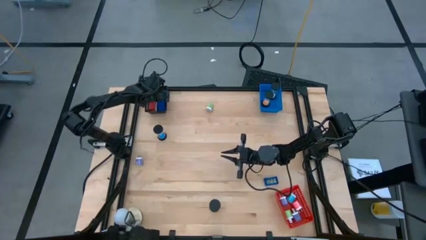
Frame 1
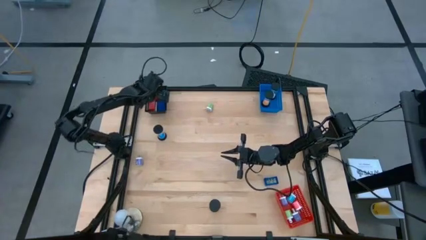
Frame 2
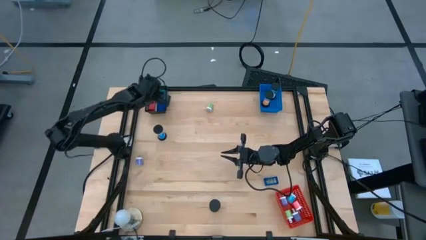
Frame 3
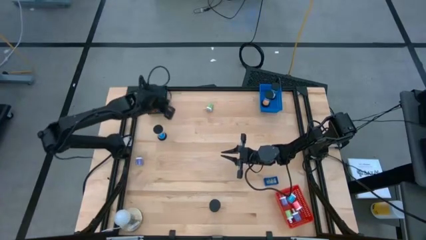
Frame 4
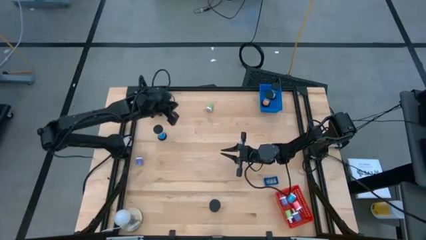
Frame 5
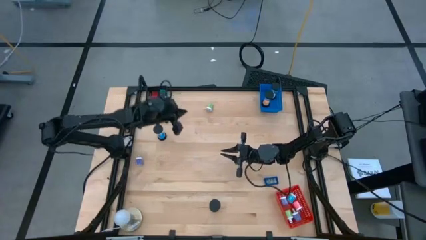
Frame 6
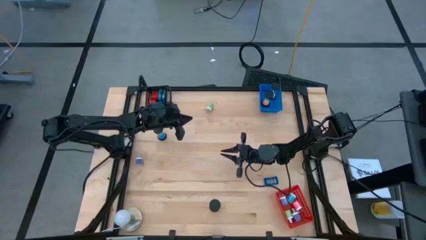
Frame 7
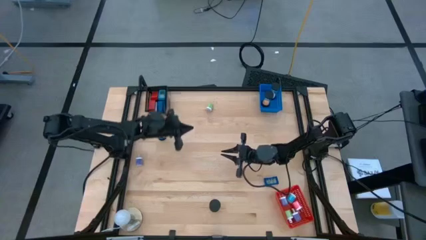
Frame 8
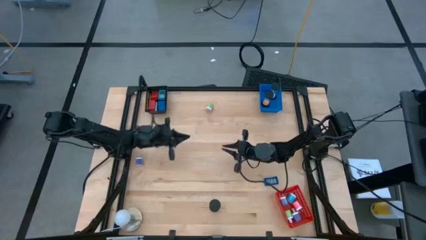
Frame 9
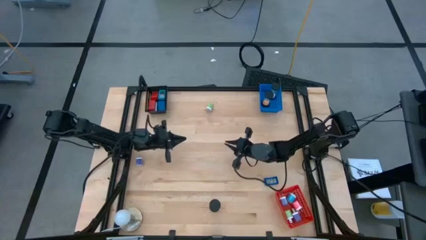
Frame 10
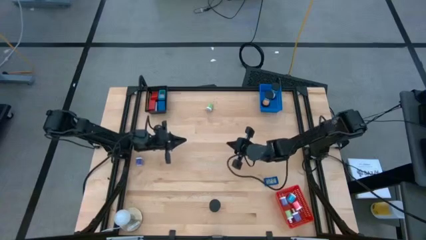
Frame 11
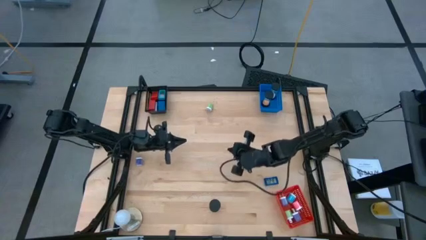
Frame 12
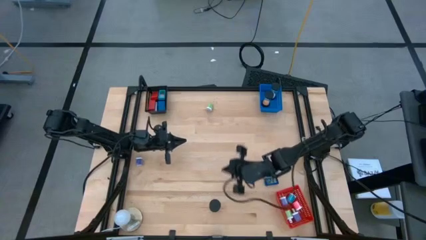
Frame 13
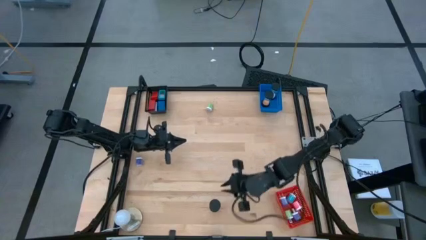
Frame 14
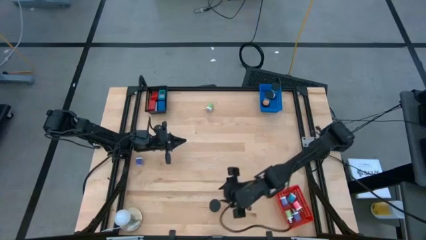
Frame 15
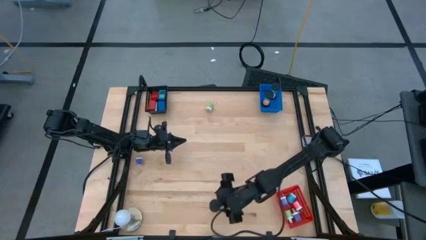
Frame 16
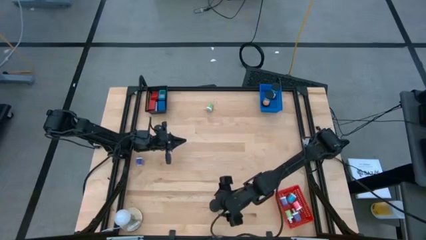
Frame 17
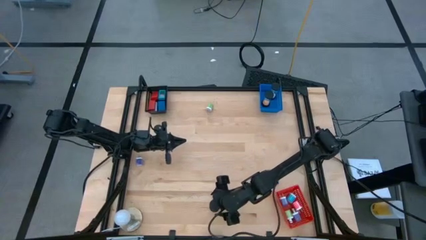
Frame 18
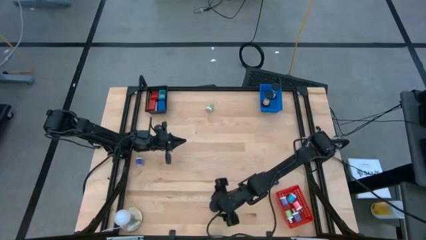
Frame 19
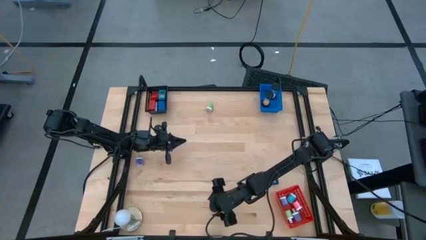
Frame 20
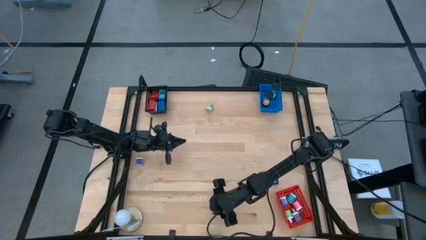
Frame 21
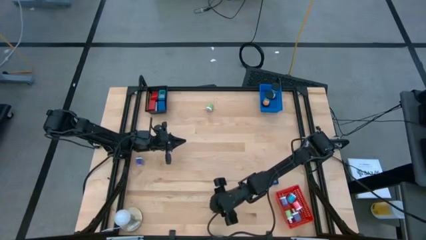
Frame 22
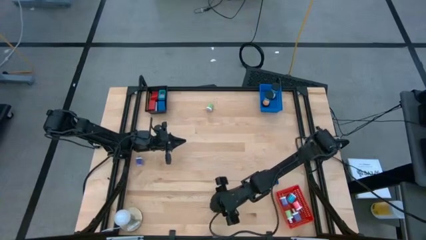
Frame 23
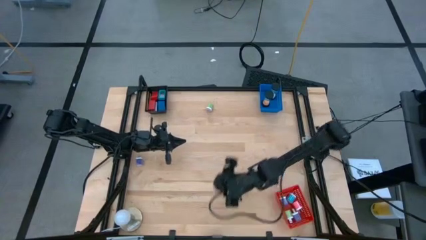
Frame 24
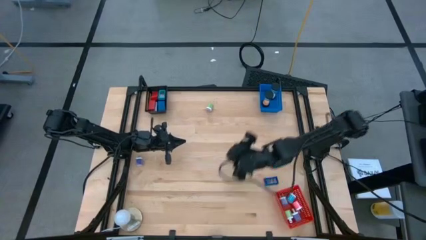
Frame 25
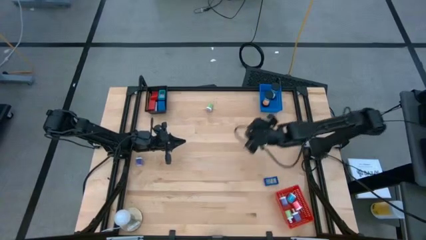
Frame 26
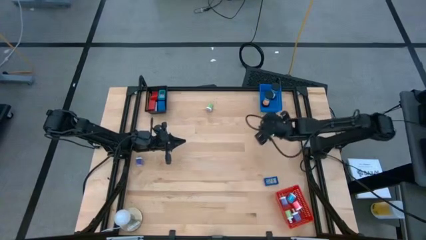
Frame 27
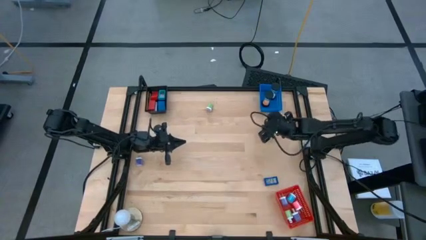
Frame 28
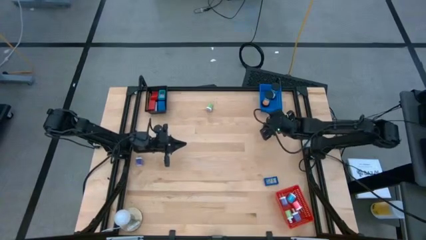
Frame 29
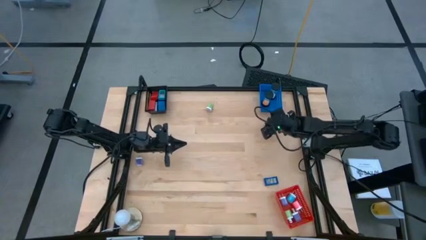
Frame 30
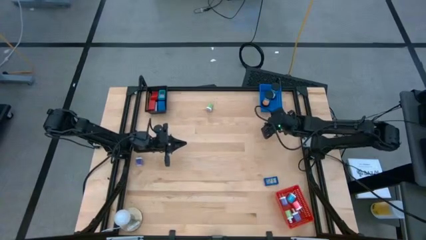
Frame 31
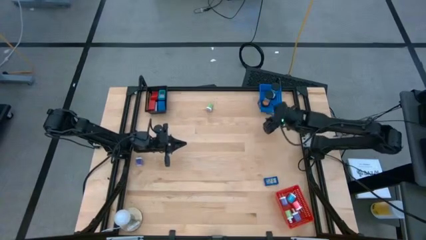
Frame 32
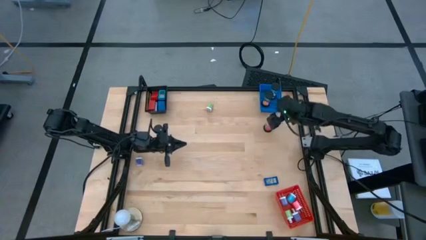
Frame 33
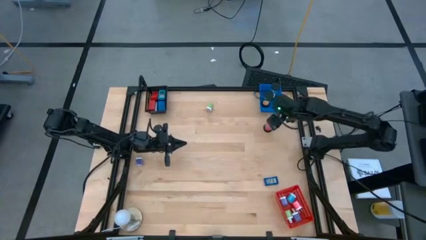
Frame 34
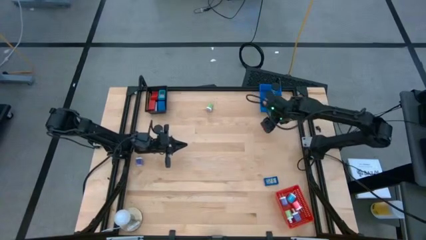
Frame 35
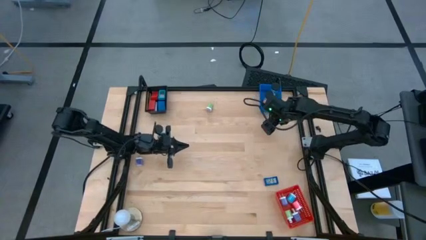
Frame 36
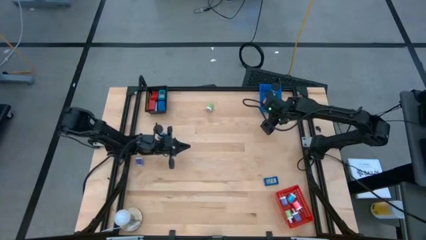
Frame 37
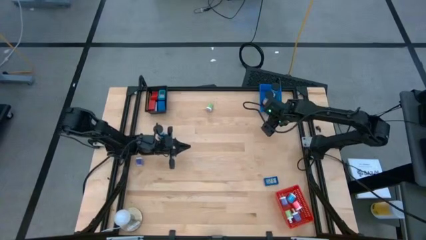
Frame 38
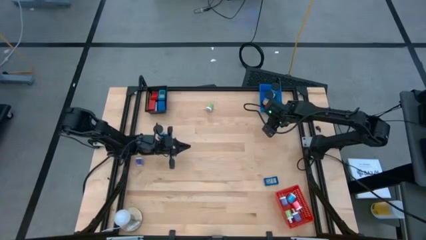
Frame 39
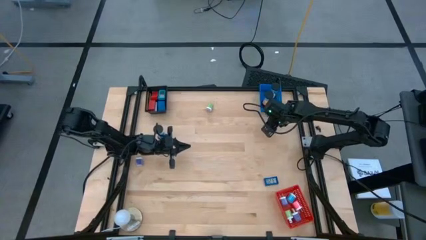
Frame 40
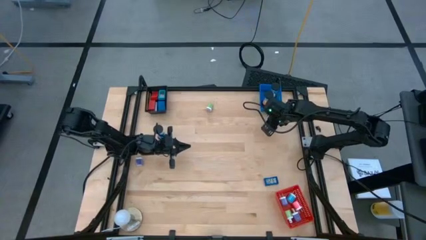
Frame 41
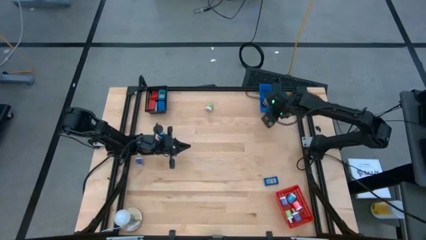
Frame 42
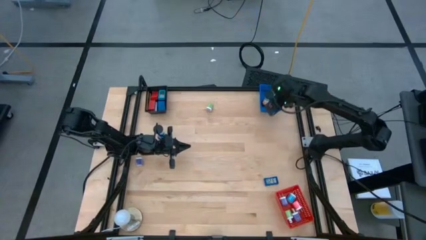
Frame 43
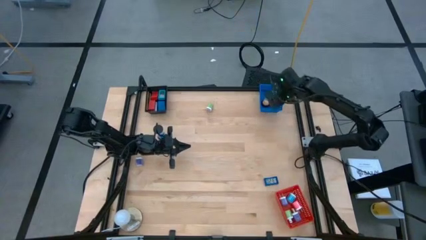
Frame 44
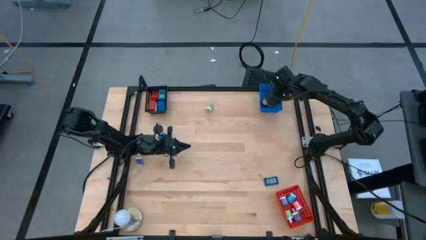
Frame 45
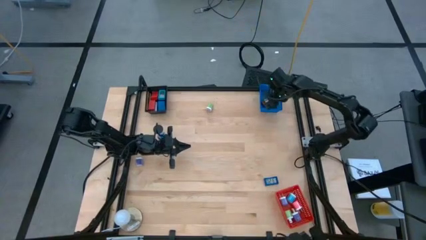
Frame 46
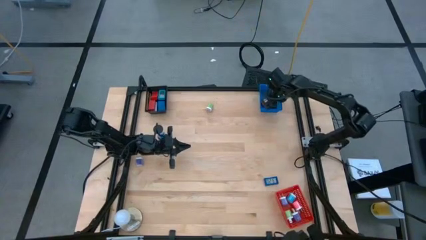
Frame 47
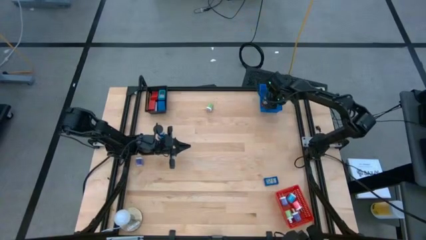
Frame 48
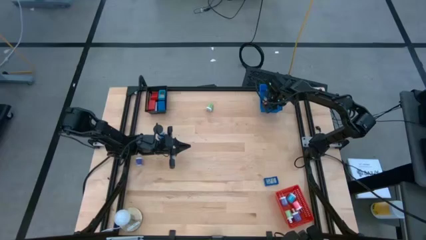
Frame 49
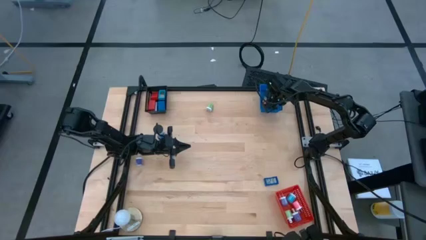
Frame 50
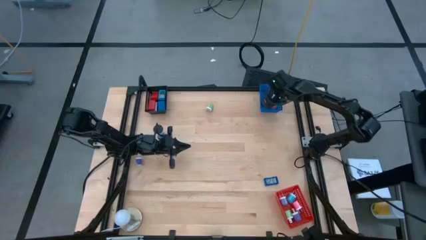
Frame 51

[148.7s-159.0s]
Task: Pick & Place Office items
Put the red sand timer into the blue basket

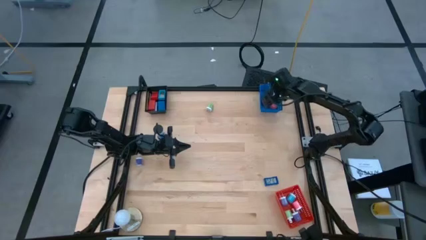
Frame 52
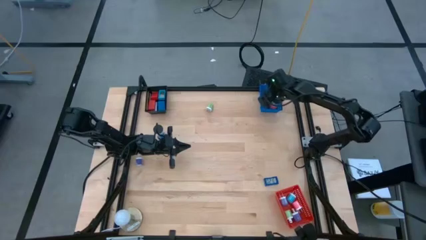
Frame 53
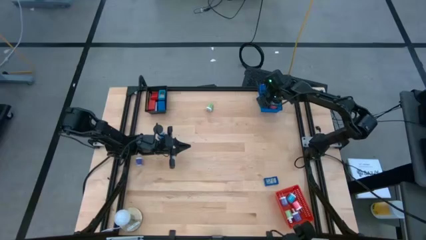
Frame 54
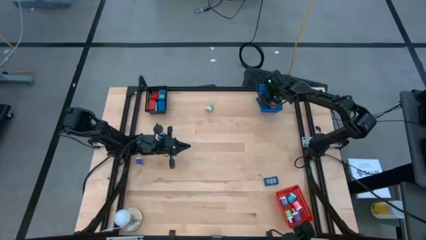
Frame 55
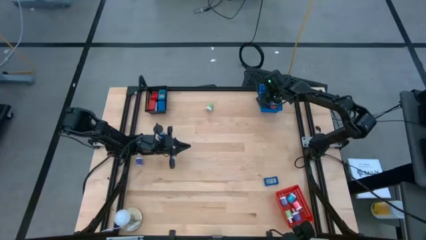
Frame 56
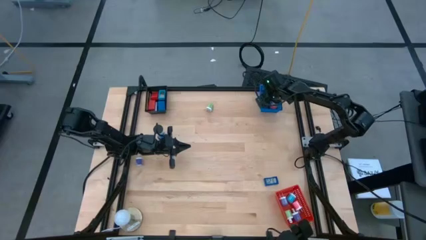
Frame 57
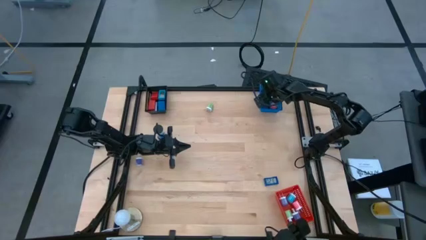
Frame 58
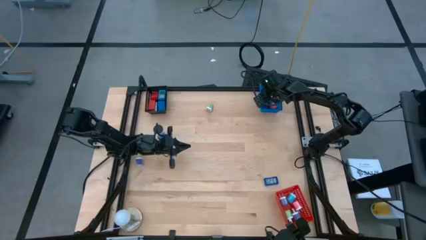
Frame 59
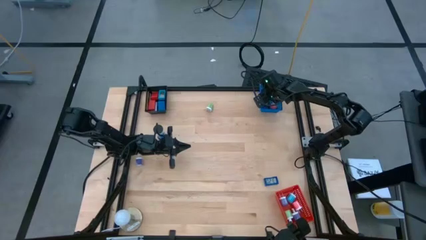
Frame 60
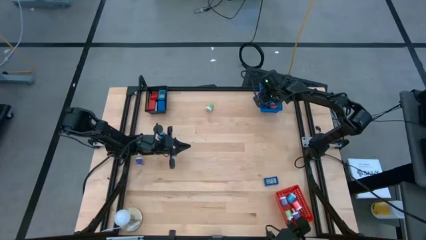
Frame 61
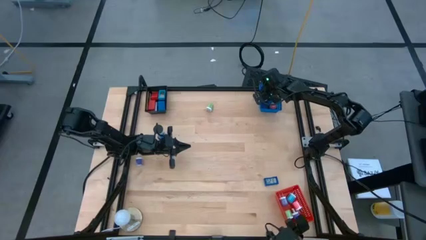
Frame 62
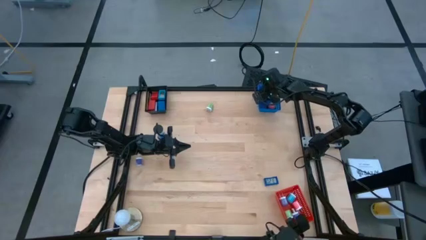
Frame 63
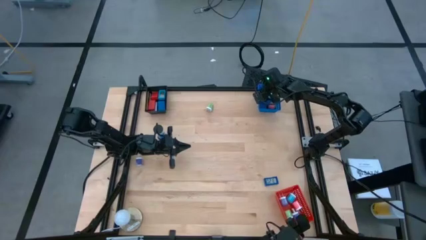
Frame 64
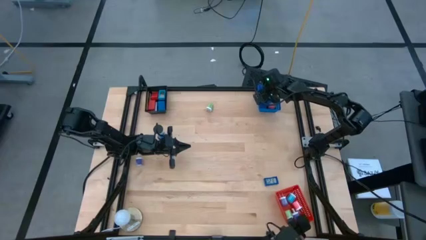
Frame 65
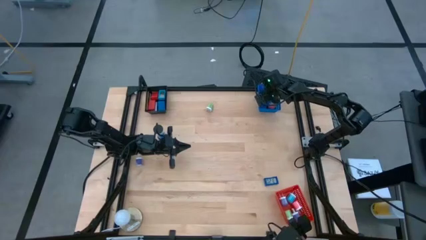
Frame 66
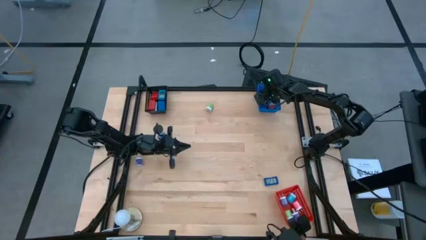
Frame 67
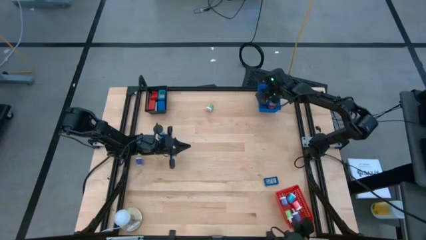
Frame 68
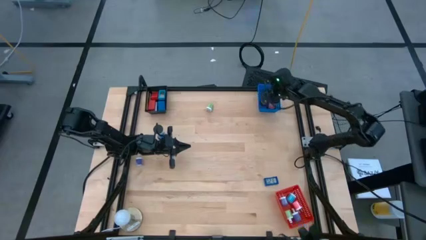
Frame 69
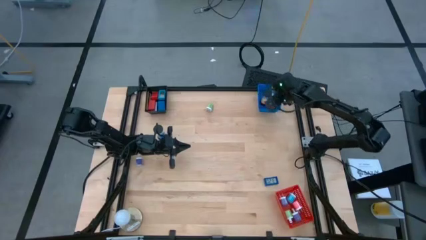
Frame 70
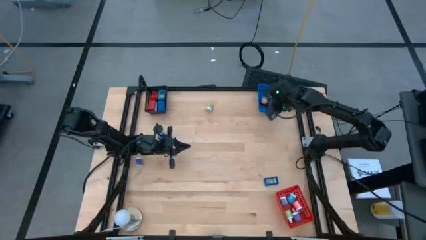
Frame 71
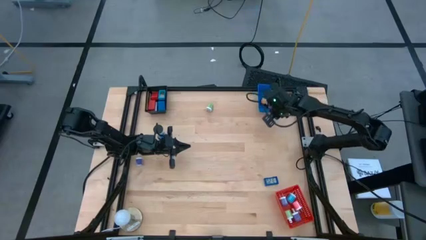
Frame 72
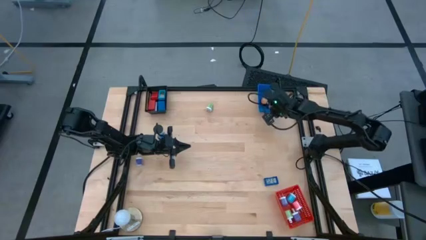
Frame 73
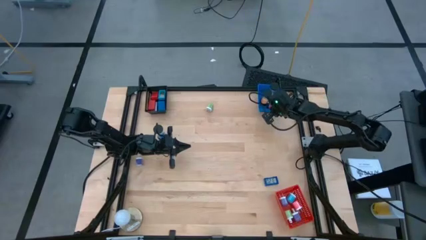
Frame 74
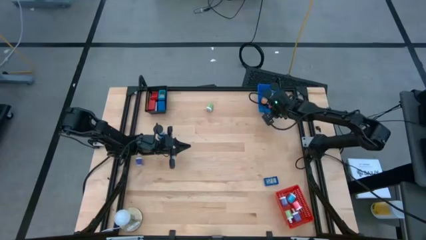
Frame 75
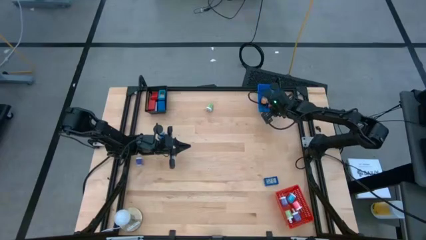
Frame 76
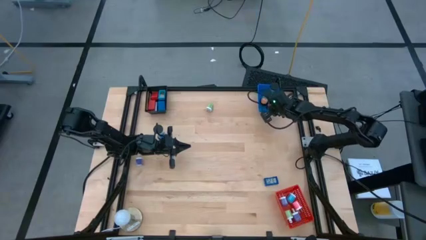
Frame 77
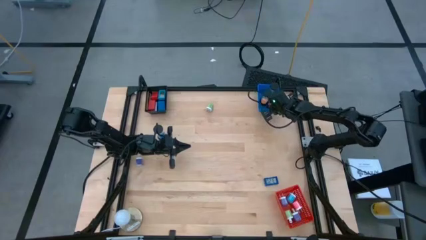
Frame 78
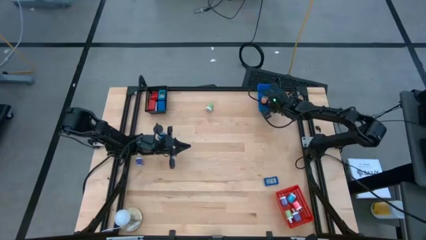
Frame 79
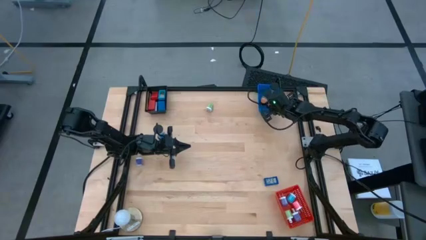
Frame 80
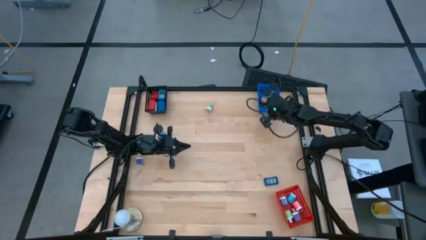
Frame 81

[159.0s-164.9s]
Adjust the orange sand timer in the blue basket

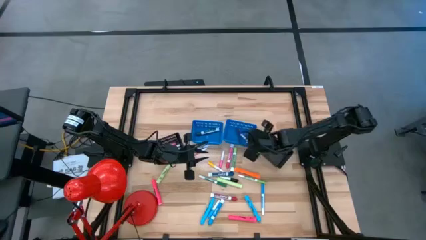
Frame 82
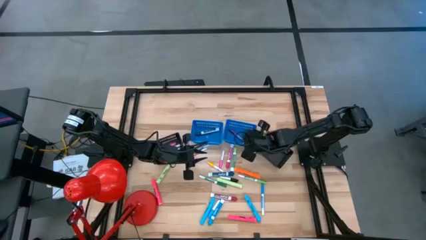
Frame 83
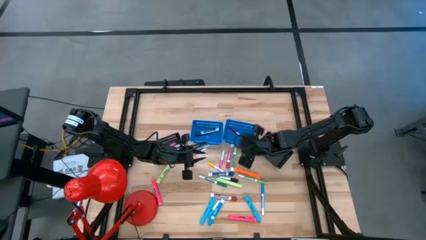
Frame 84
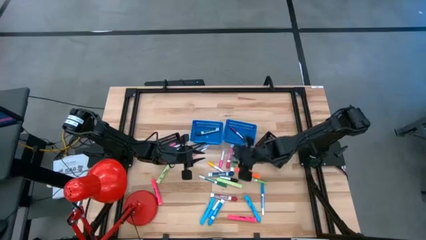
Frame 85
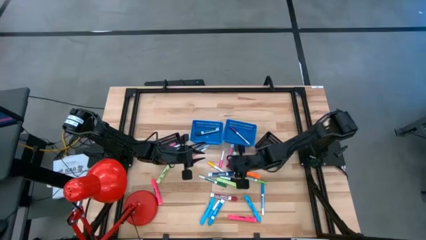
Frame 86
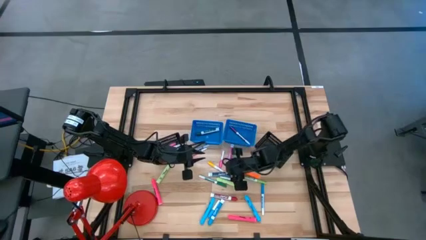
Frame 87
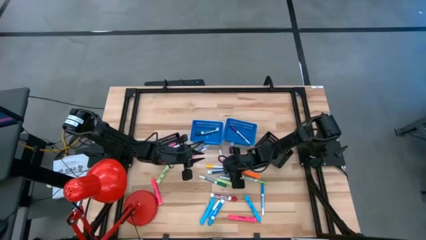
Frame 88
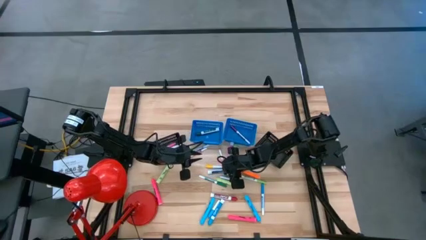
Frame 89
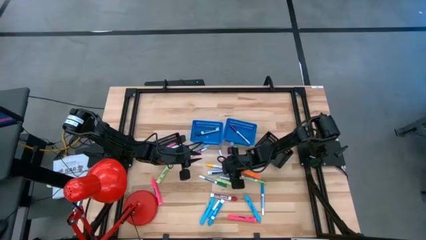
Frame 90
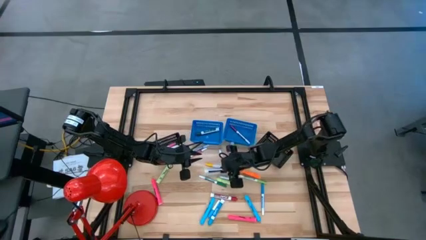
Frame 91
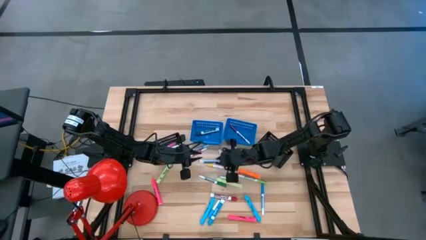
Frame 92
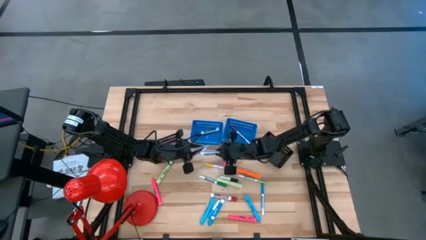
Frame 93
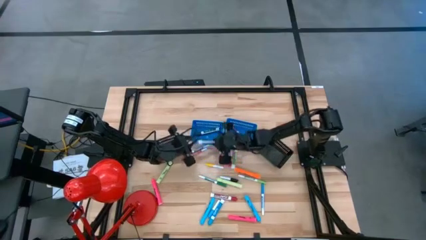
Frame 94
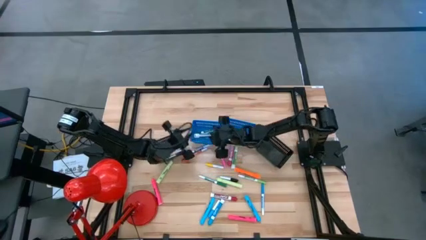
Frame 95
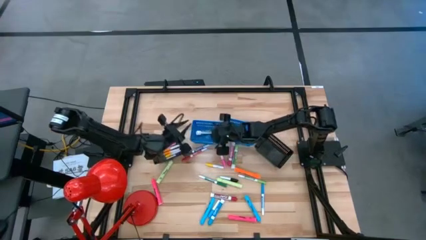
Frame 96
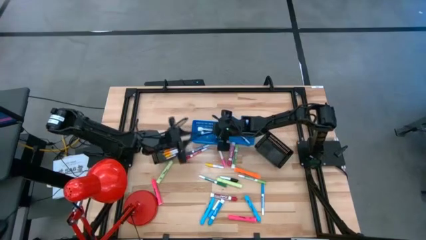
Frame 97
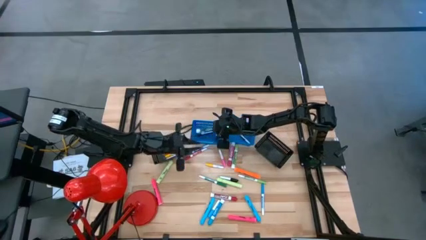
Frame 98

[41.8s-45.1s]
Task: Pick & Place Markers
Put the dark blue solvent marker into the left blue bin
